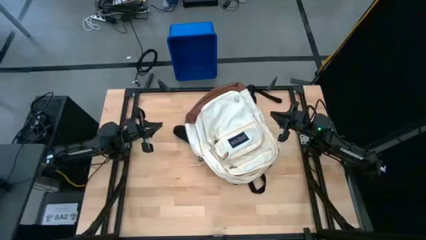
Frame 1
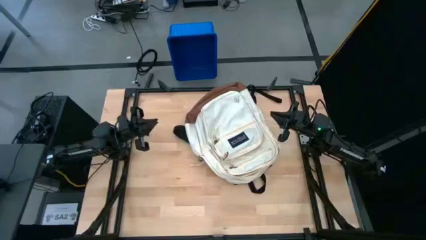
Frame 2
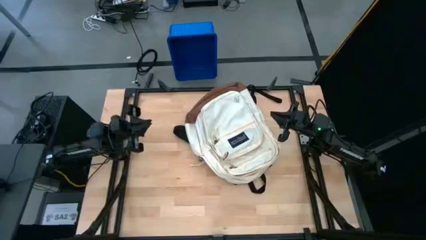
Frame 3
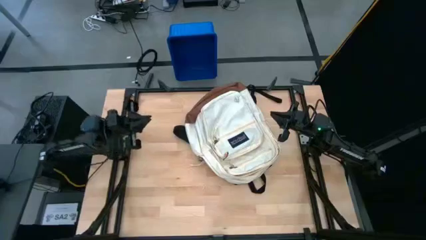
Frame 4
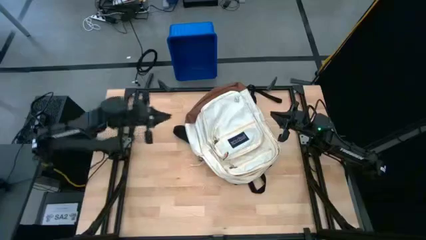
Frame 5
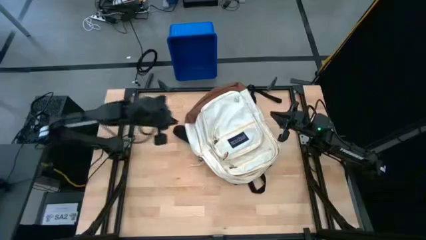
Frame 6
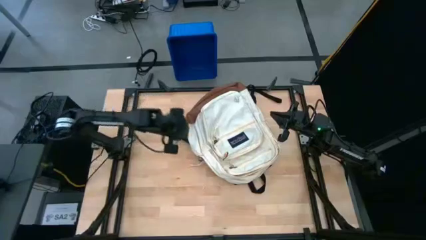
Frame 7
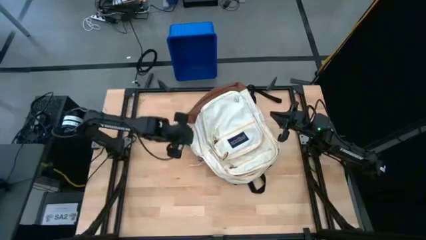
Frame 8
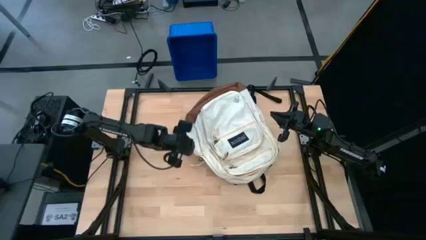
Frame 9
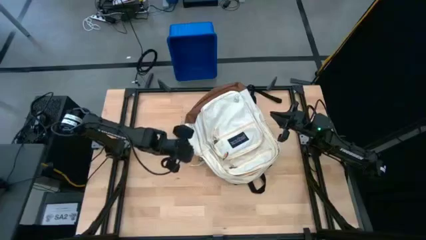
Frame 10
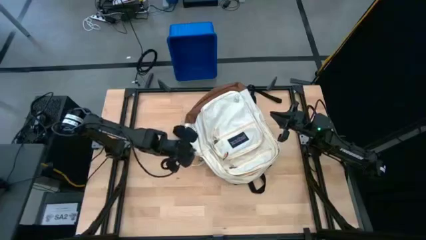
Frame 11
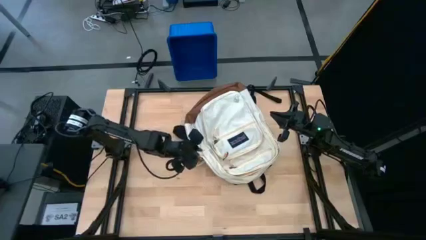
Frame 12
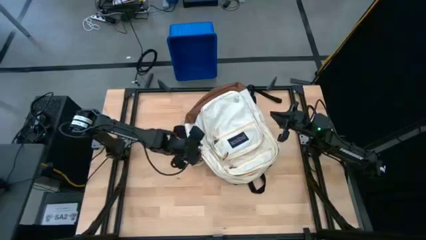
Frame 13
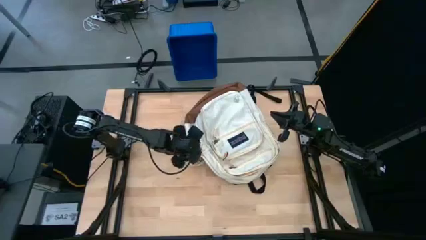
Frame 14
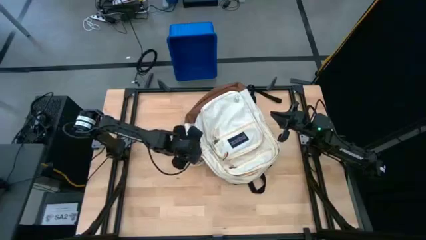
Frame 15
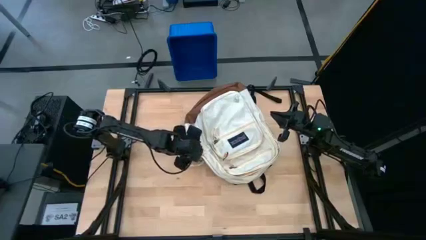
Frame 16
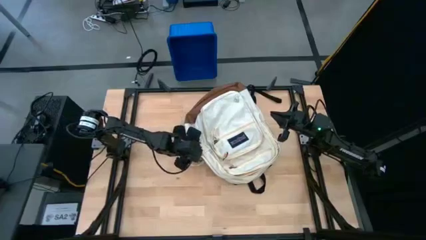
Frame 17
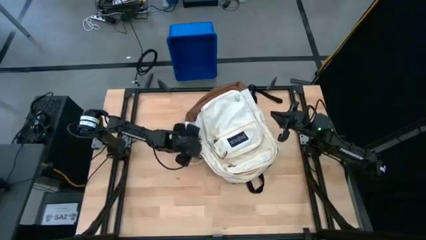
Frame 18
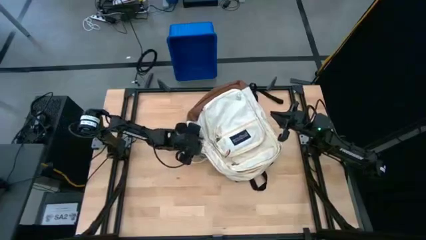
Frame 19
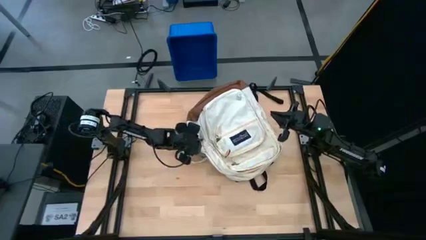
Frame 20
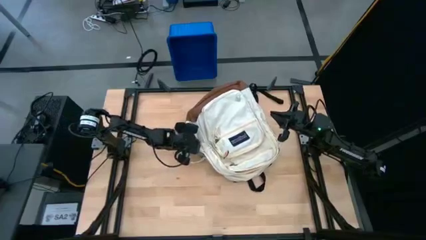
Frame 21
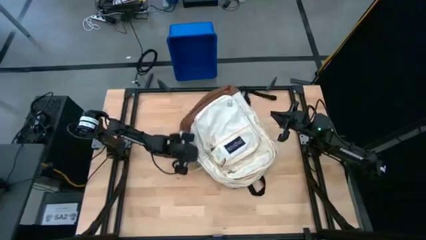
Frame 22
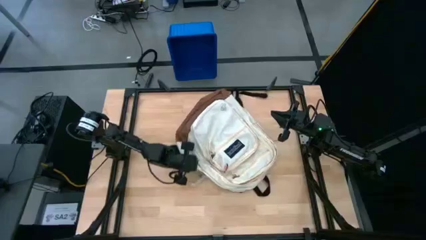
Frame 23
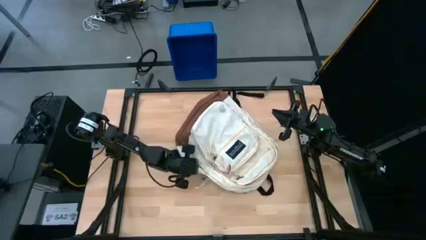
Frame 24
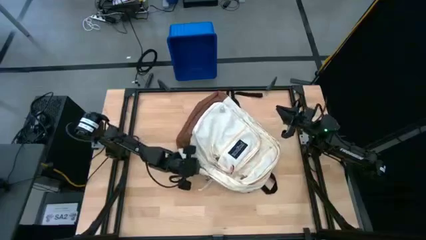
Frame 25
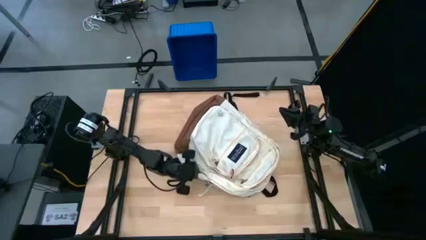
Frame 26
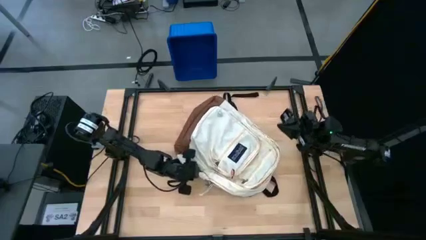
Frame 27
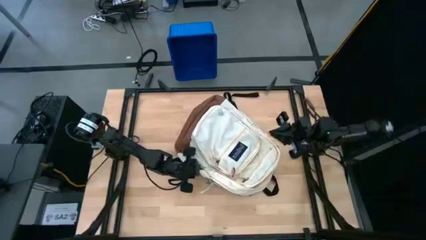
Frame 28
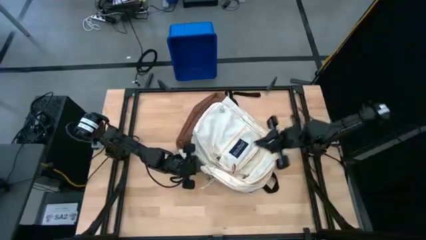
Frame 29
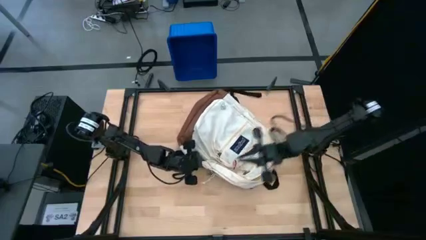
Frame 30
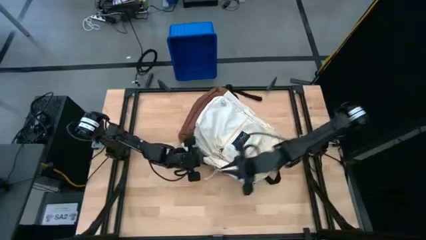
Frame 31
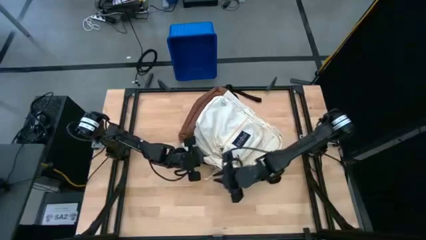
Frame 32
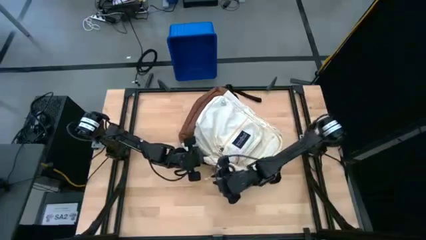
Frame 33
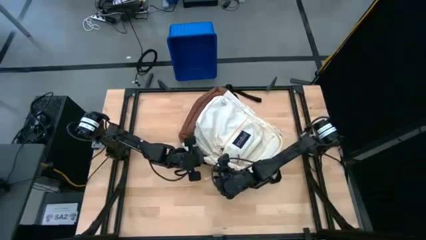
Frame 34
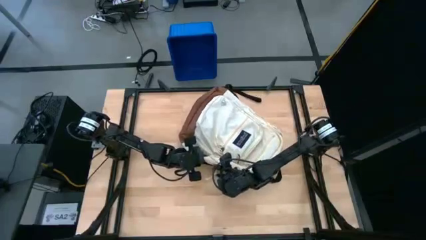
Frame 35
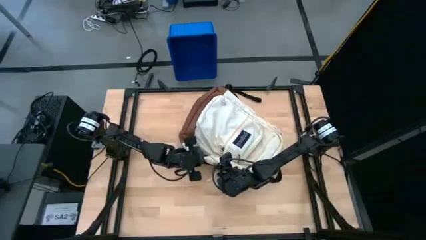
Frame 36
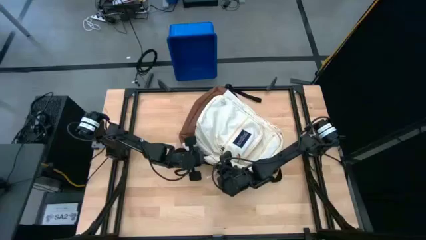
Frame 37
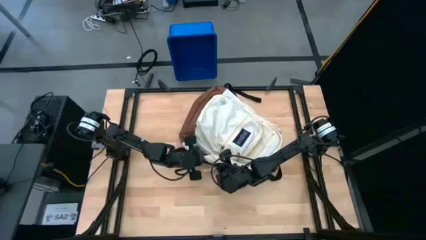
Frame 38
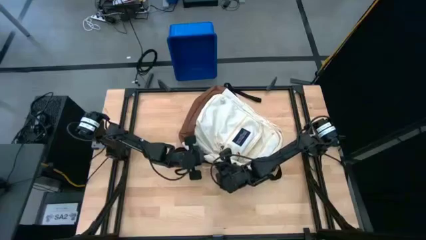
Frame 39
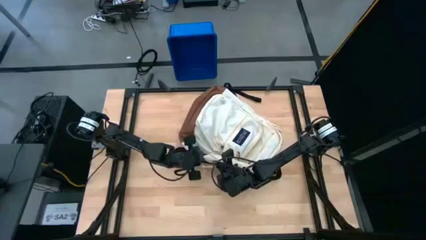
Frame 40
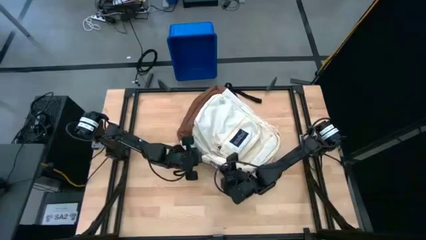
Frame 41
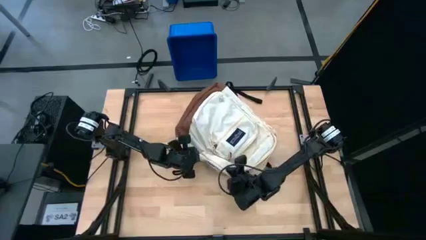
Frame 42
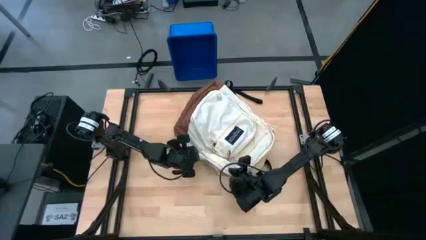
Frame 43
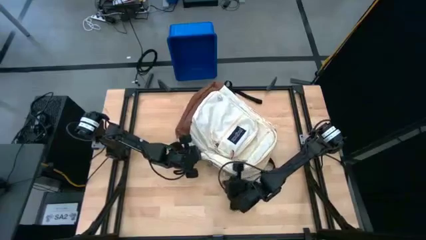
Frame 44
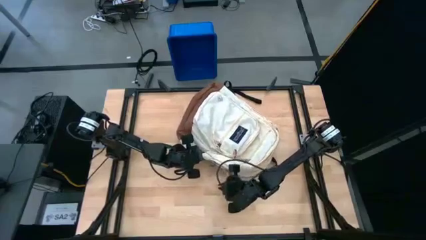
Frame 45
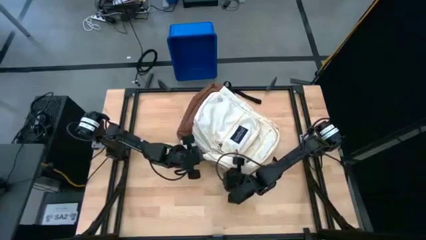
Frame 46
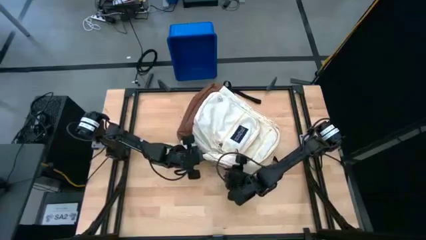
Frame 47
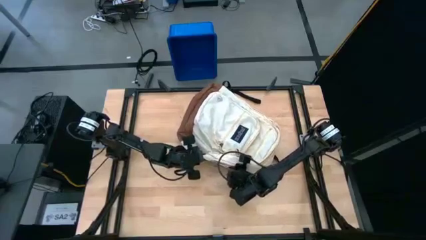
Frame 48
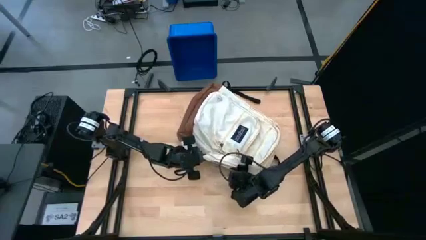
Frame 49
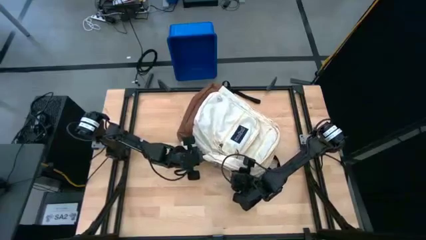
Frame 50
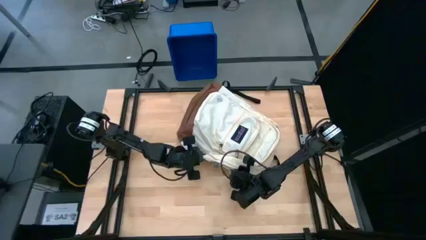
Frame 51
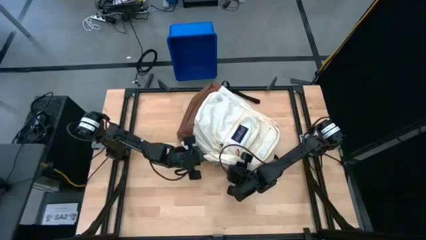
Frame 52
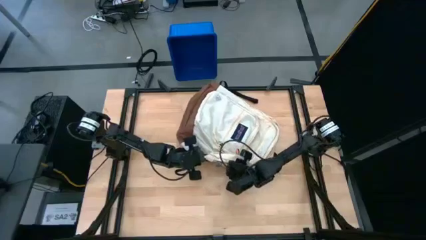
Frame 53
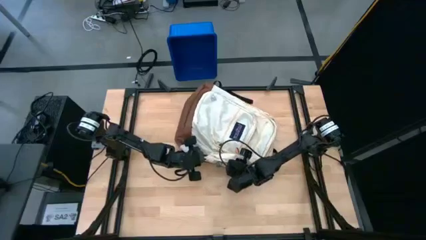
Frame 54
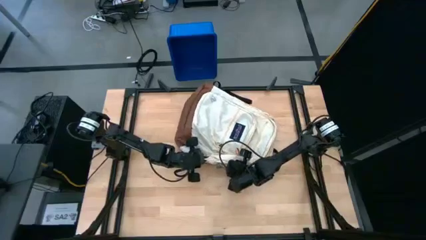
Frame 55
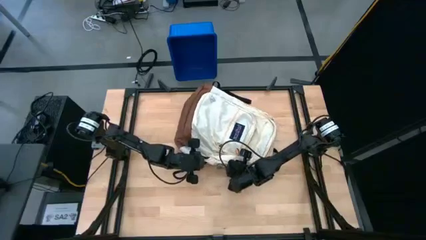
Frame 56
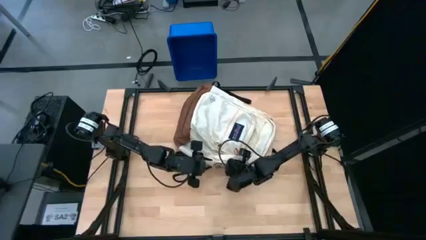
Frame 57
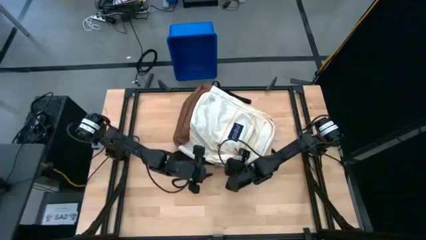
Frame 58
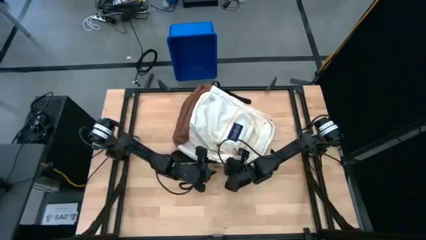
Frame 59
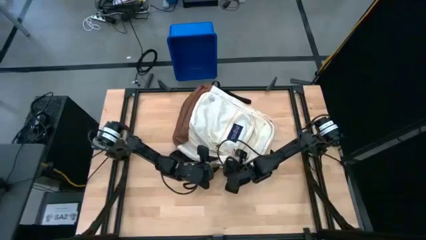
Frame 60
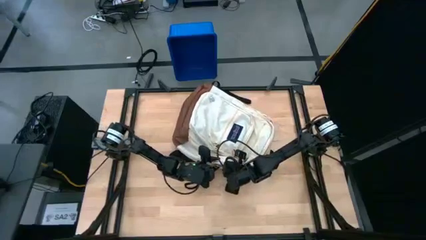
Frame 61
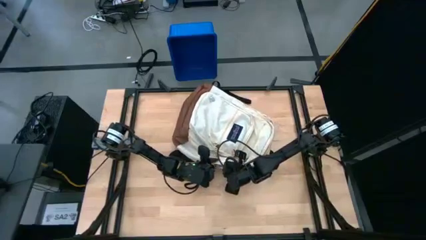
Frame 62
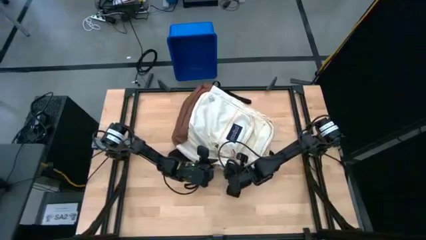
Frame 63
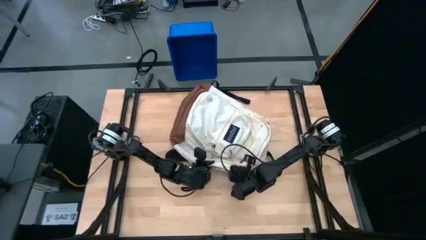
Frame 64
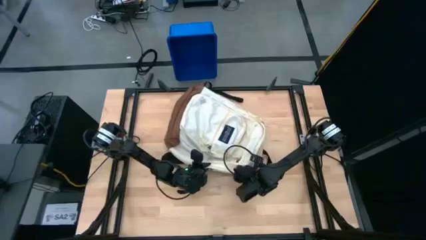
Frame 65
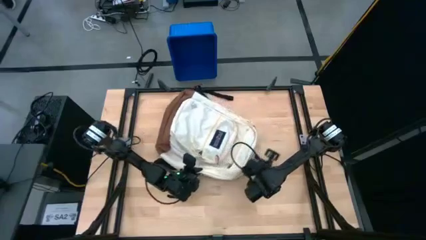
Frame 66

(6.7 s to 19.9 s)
Task: Unpack backpack
Open the white backpack
